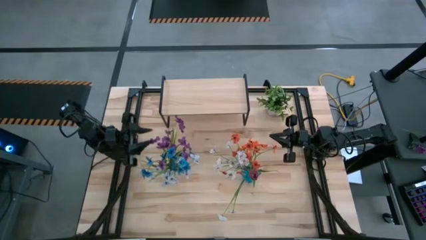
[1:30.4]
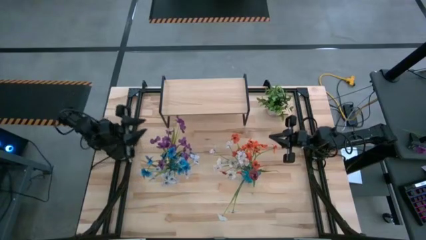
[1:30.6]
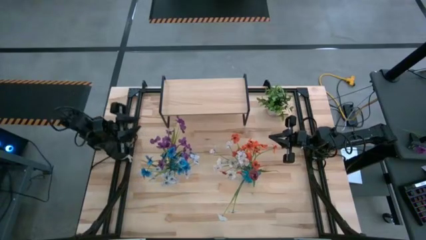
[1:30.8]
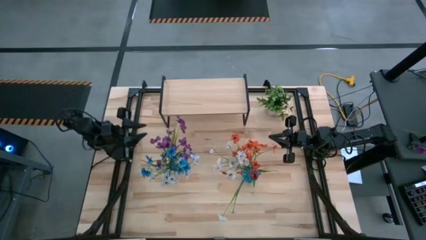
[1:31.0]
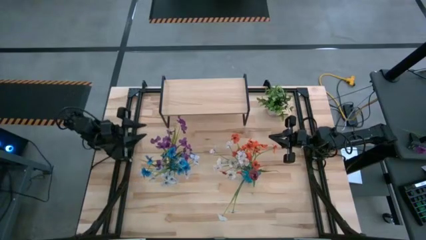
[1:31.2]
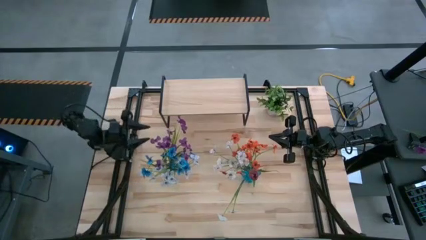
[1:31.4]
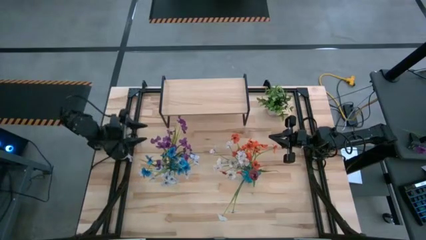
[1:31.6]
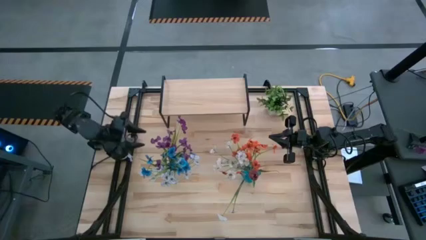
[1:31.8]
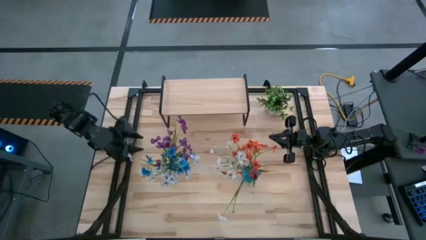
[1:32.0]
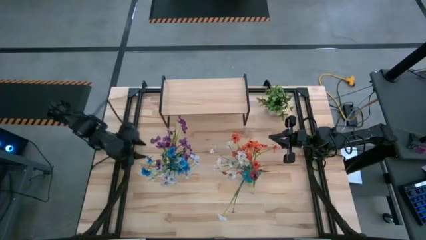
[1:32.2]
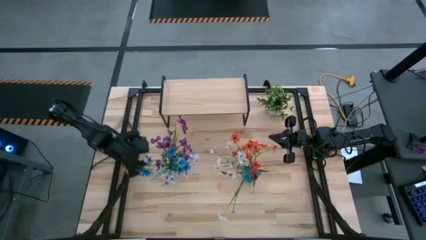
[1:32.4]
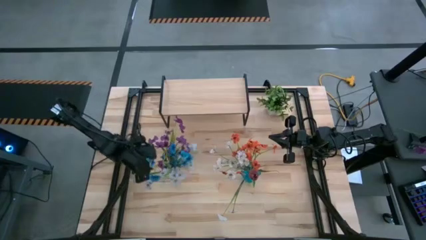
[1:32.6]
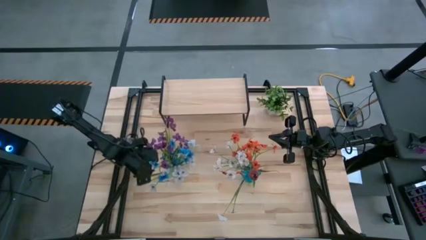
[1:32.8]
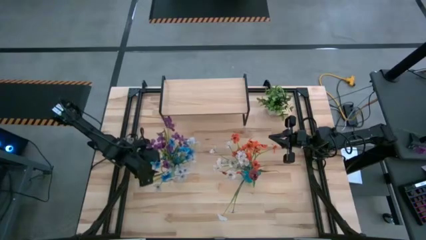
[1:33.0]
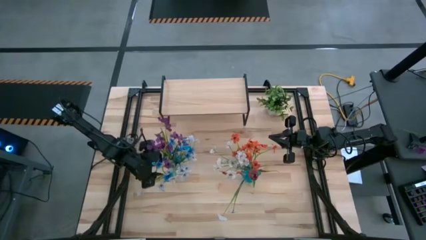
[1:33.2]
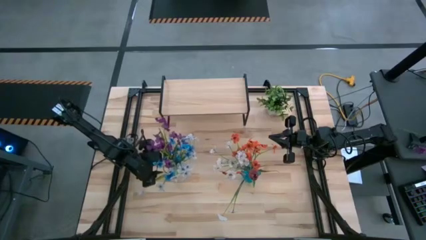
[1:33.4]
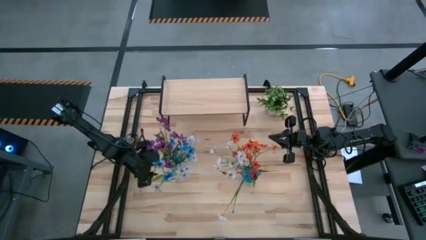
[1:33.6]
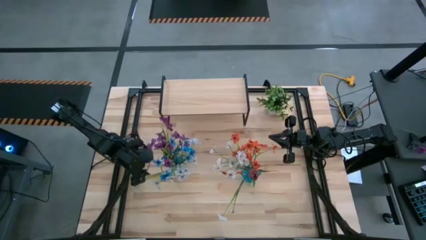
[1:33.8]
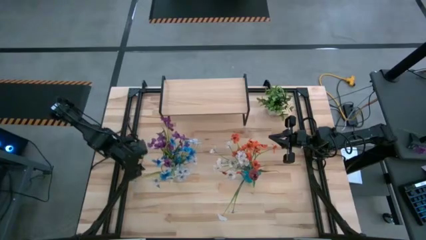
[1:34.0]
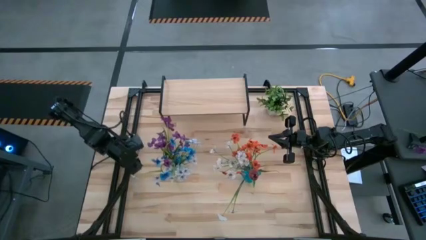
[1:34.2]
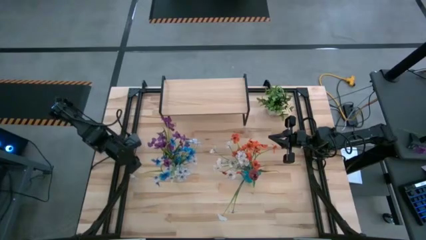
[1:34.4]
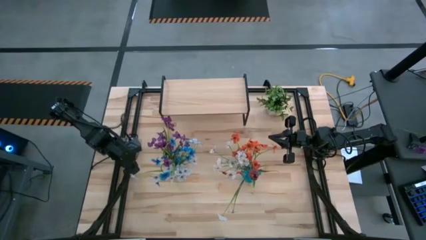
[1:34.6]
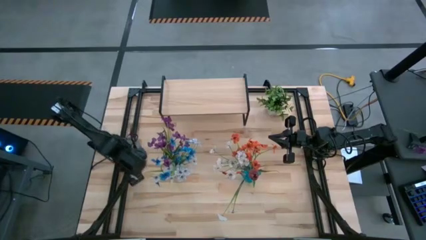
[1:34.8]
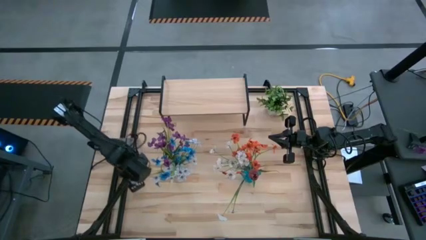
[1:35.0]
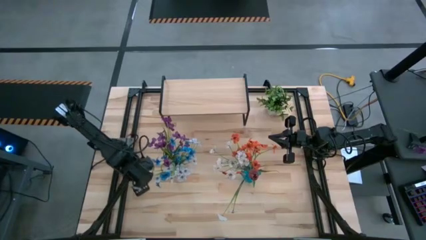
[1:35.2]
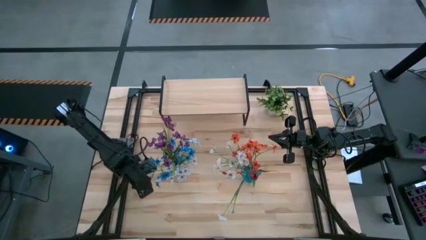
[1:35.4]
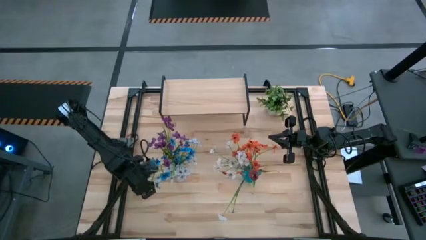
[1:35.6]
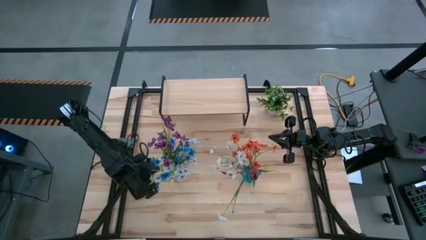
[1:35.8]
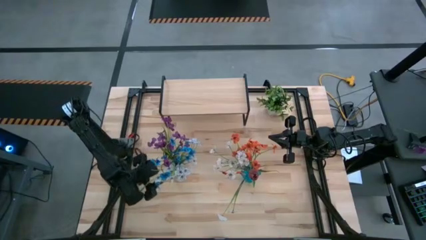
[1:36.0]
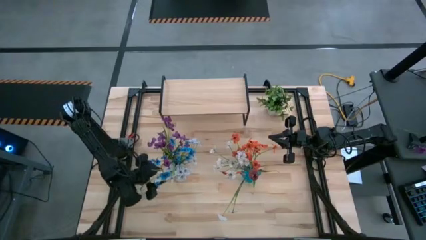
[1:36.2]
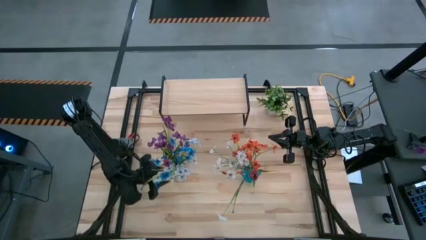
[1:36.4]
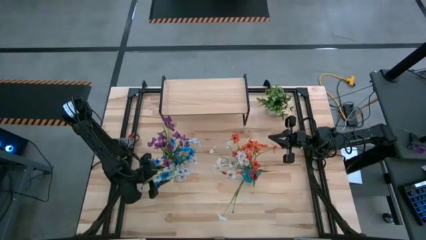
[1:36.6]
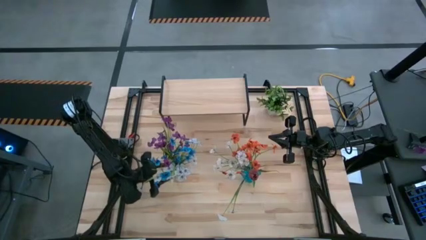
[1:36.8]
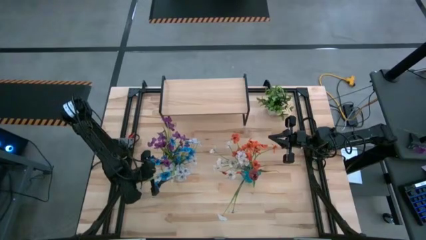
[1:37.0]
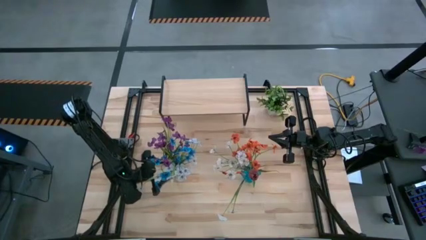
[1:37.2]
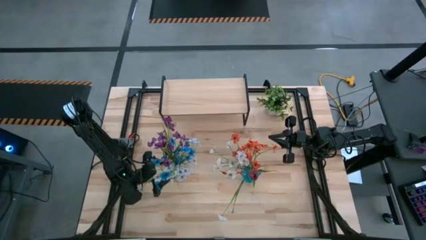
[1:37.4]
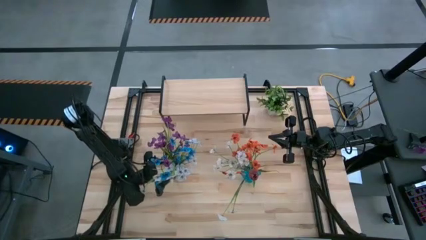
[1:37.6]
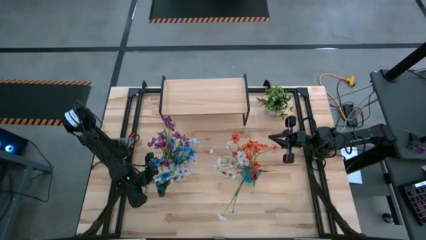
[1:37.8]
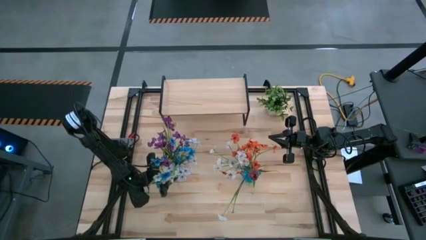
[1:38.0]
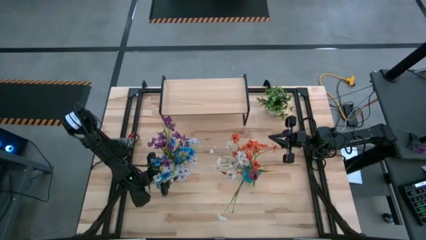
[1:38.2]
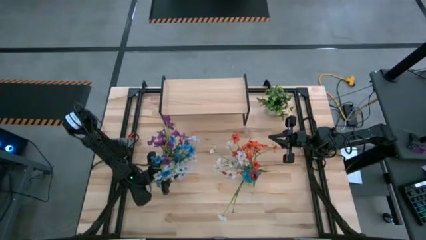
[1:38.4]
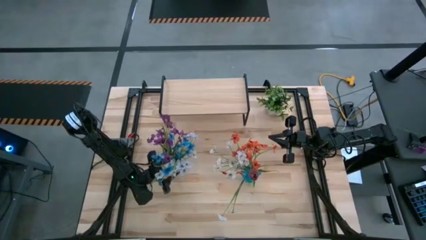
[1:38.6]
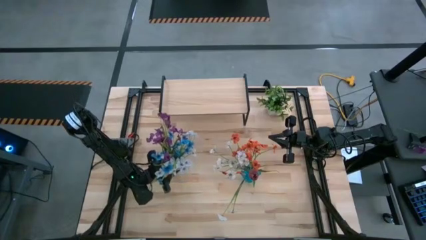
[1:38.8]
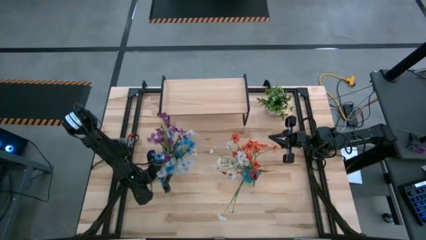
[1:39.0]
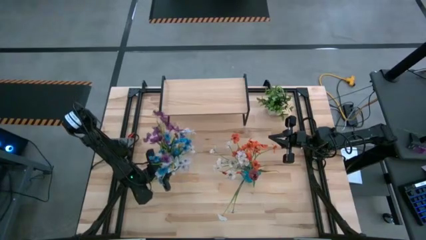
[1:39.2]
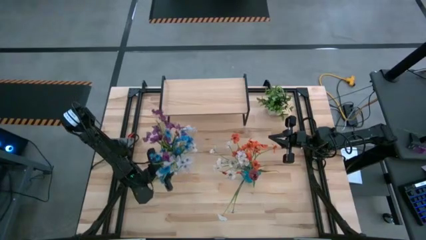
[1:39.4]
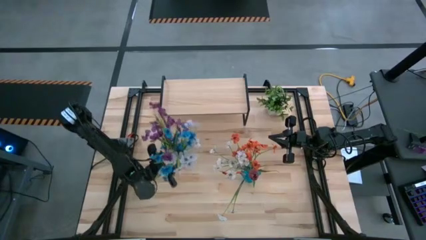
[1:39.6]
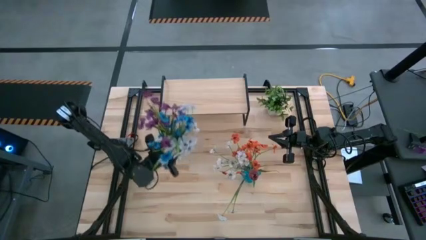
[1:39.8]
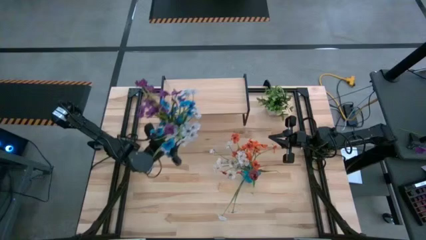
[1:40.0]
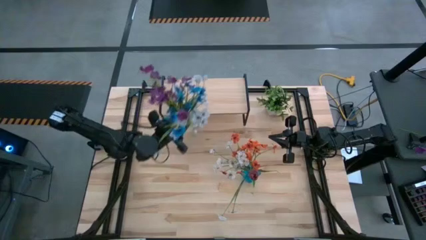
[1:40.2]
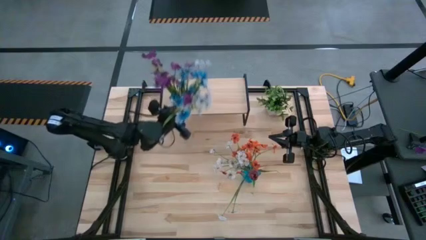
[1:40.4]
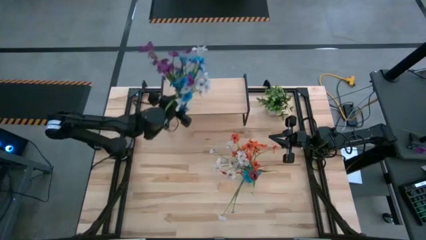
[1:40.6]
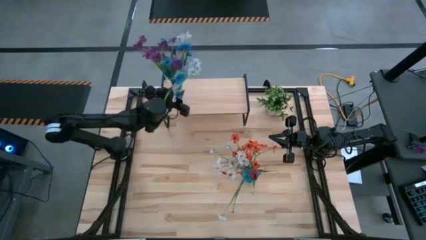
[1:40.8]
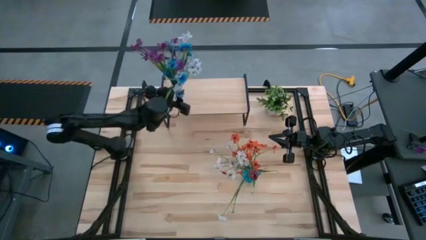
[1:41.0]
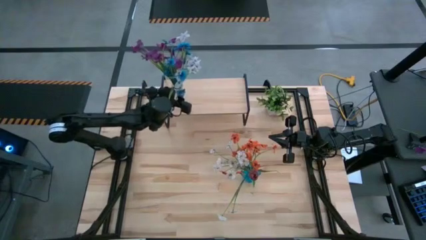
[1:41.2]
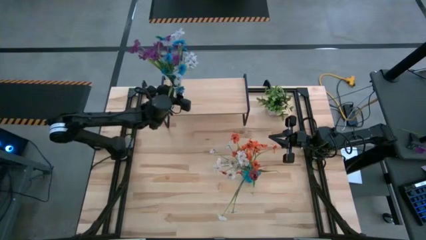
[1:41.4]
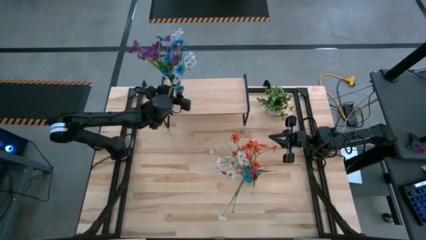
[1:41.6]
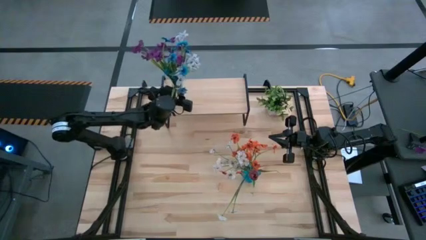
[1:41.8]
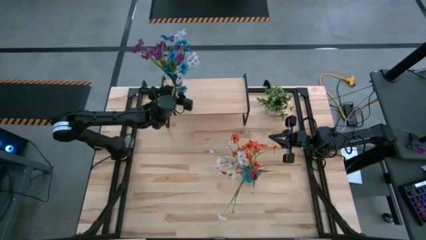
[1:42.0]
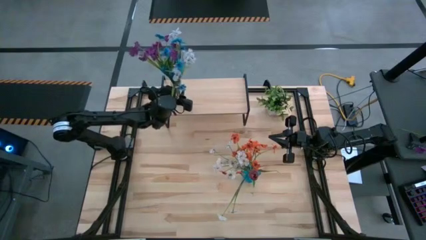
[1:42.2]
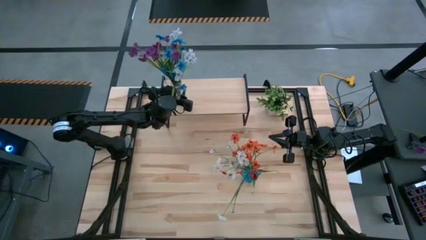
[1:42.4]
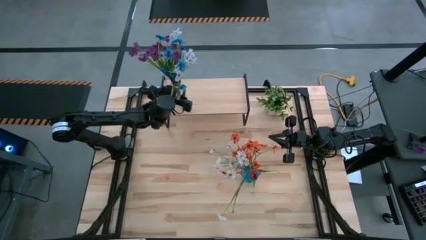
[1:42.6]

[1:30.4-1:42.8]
Task: Pick and place flowers into a vace then onto a shelf
Put the transparent vase on the shelf

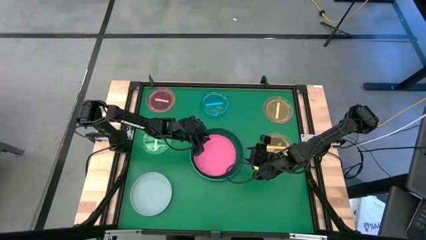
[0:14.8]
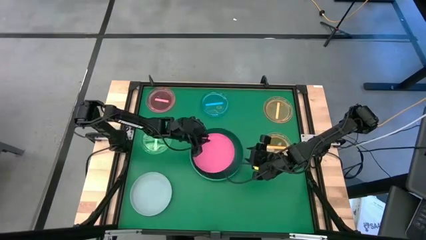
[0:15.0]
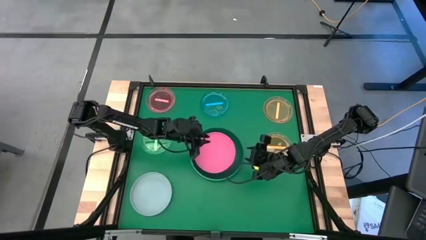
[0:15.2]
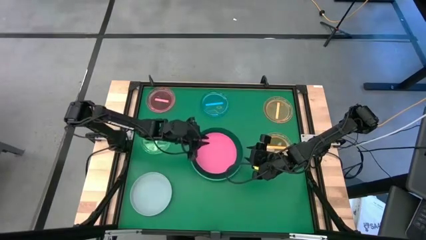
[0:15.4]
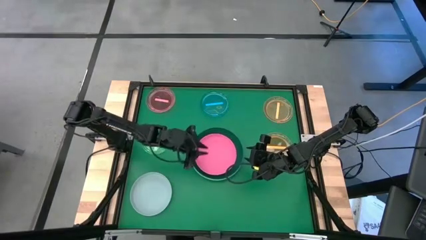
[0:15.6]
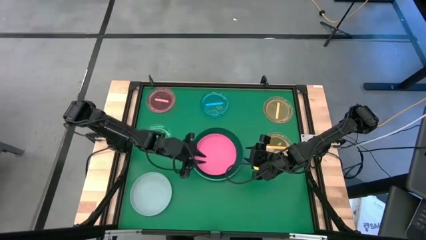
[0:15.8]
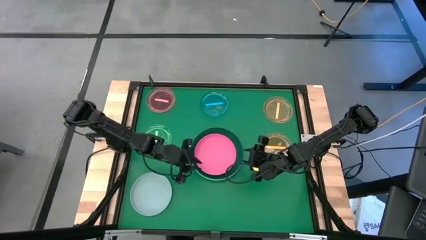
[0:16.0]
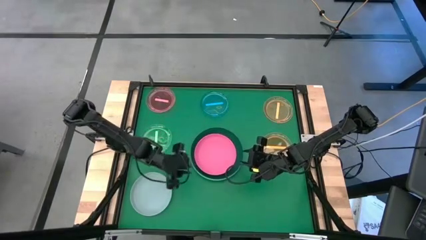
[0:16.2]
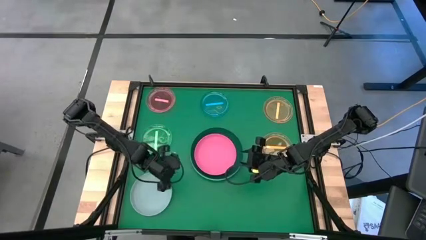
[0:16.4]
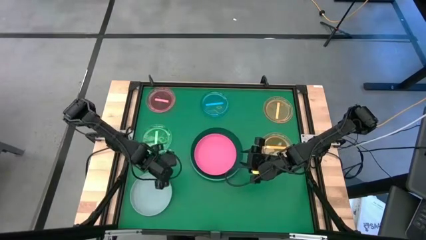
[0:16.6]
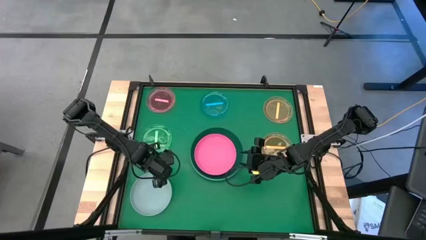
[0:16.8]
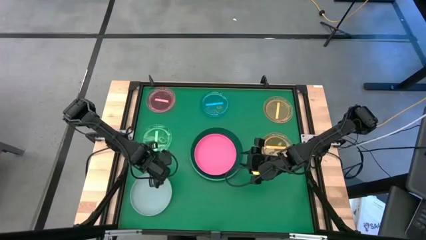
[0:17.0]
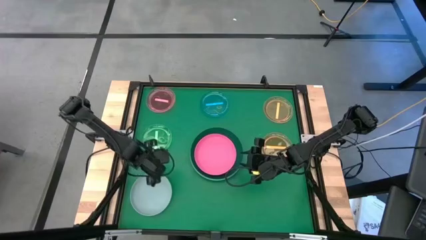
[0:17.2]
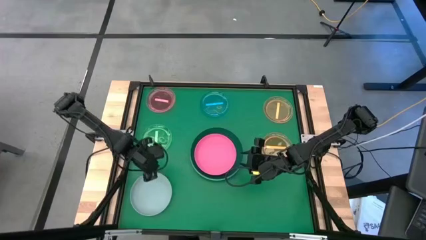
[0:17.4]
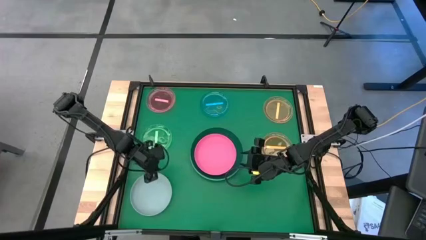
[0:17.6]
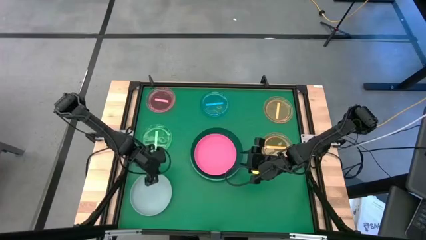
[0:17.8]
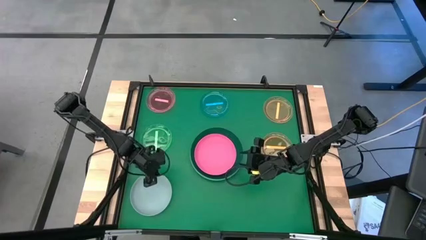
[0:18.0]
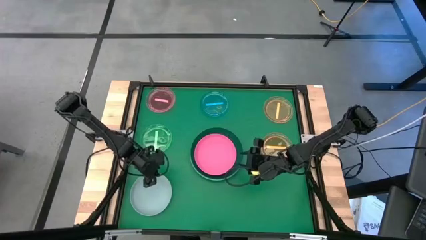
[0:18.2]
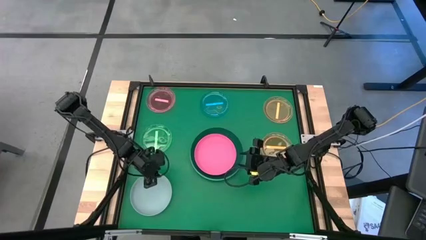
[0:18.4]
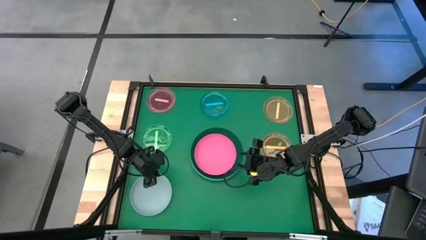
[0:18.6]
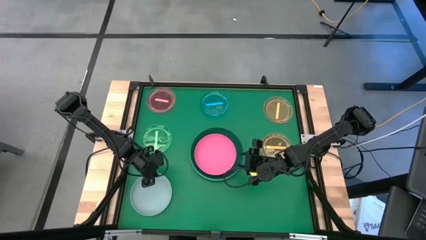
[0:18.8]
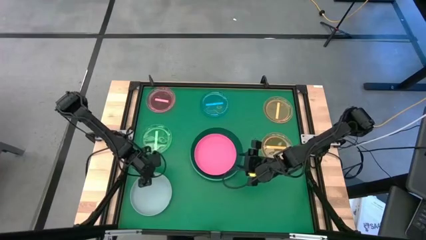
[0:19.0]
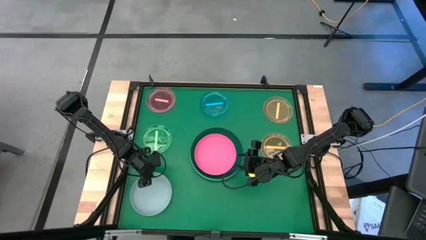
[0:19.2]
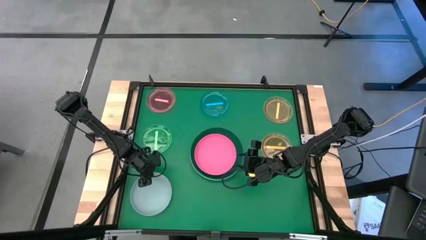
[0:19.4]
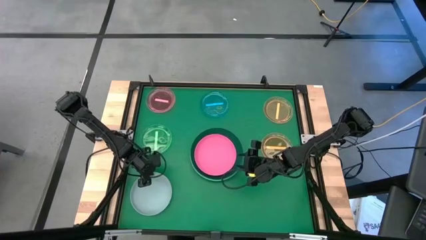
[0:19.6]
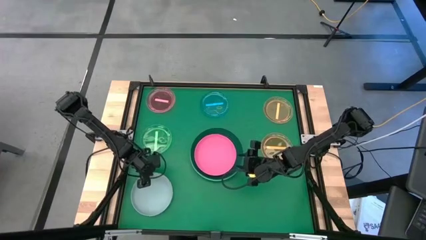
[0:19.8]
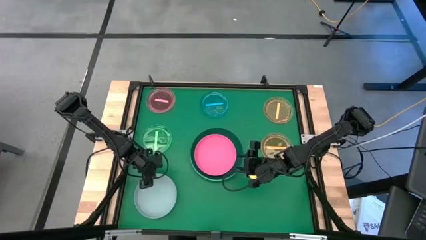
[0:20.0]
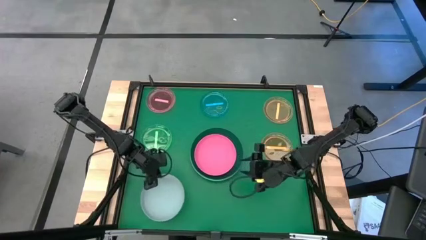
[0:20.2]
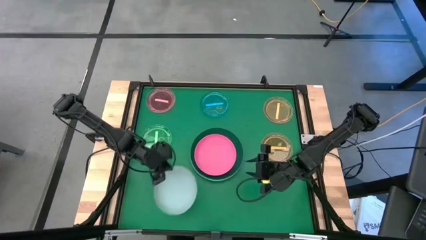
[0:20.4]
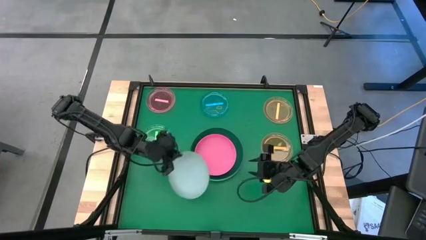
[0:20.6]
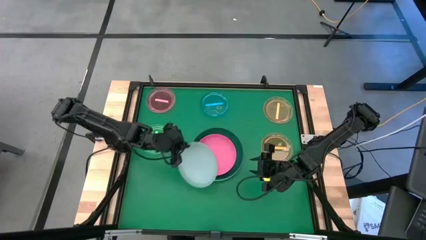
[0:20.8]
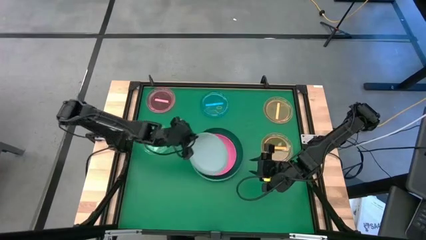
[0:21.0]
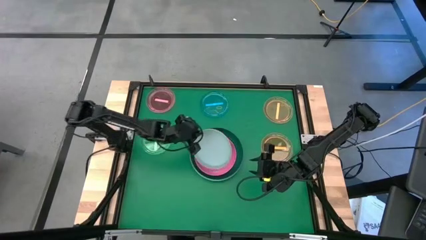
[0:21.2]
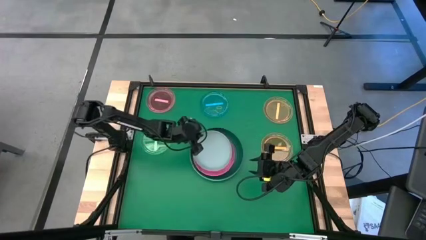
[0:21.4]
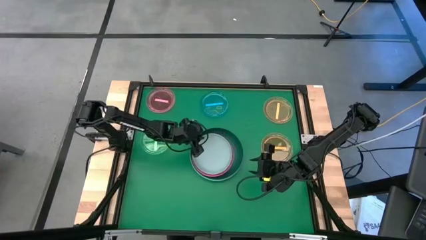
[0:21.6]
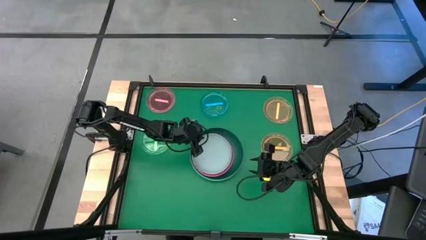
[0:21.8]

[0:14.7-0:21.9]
Task: Stack plastic plates
Stack the gray plate on top of the pink plate
